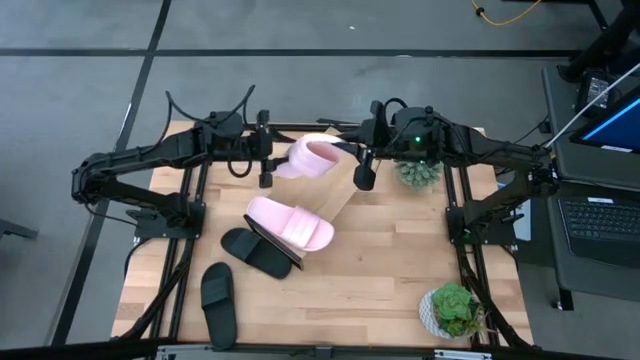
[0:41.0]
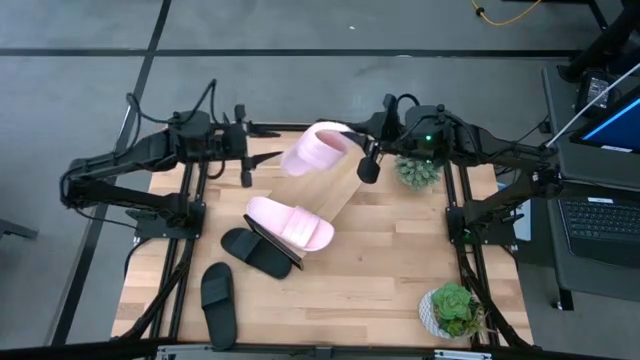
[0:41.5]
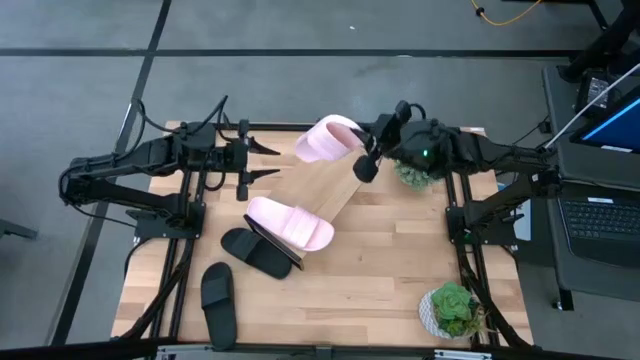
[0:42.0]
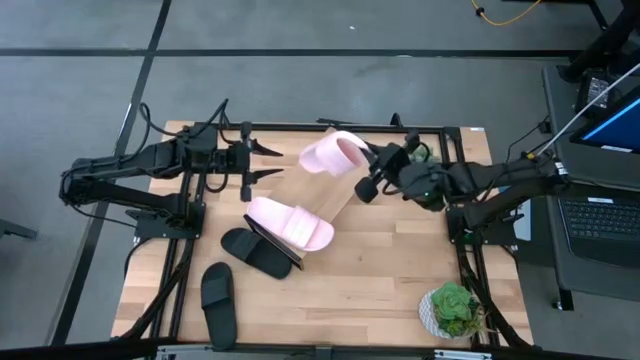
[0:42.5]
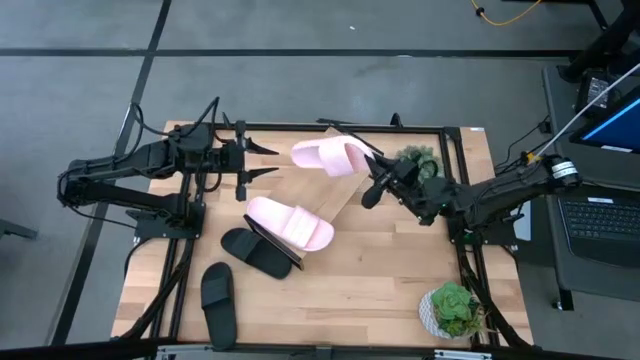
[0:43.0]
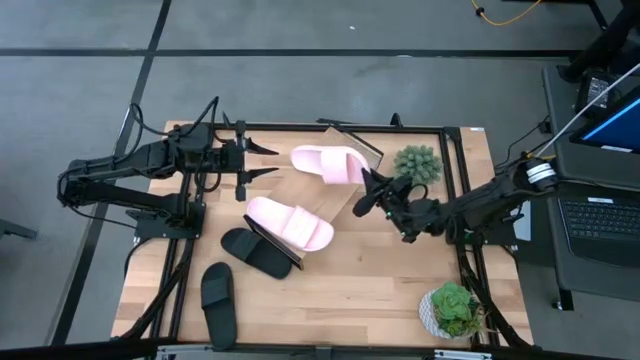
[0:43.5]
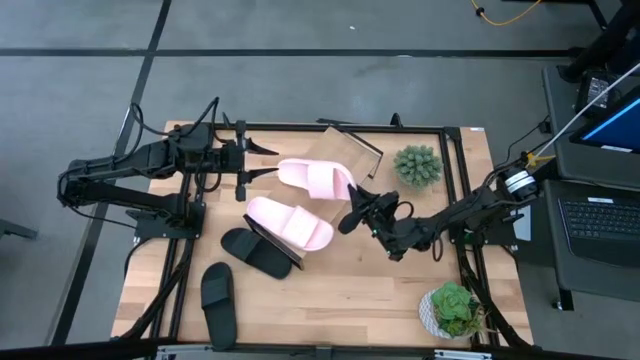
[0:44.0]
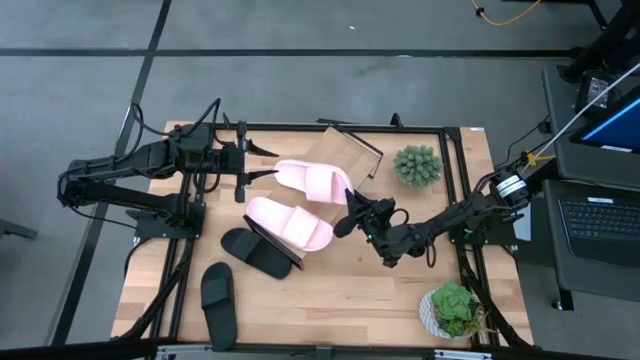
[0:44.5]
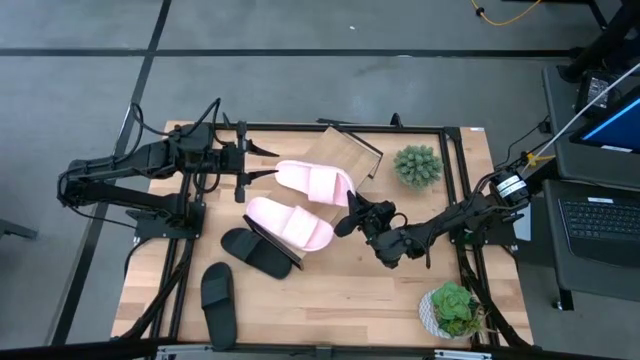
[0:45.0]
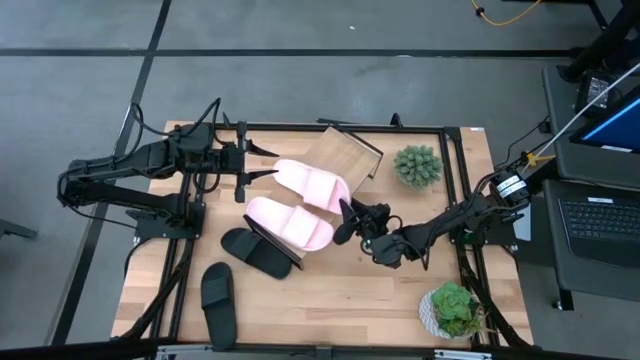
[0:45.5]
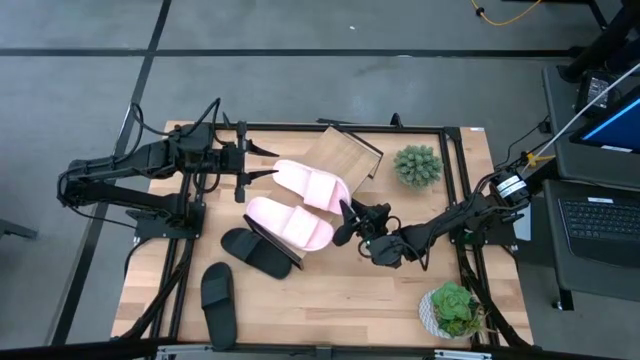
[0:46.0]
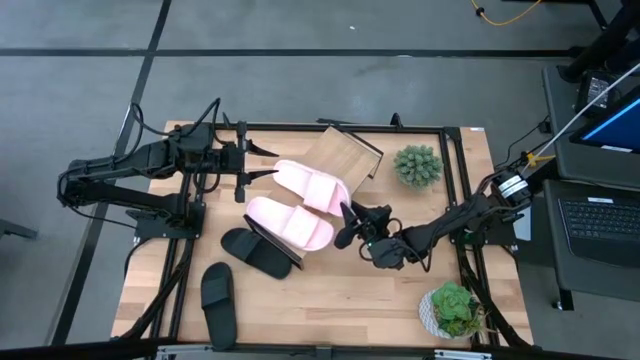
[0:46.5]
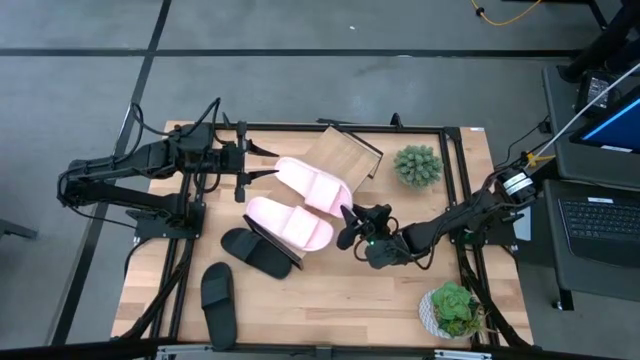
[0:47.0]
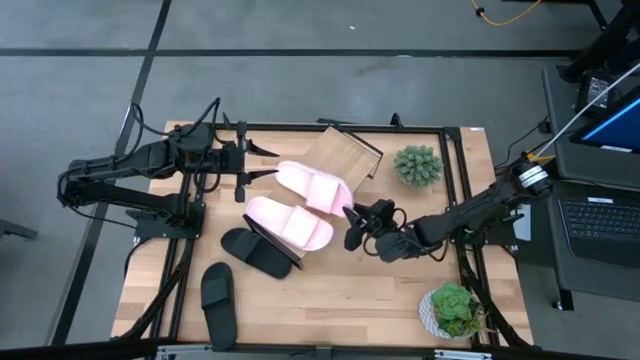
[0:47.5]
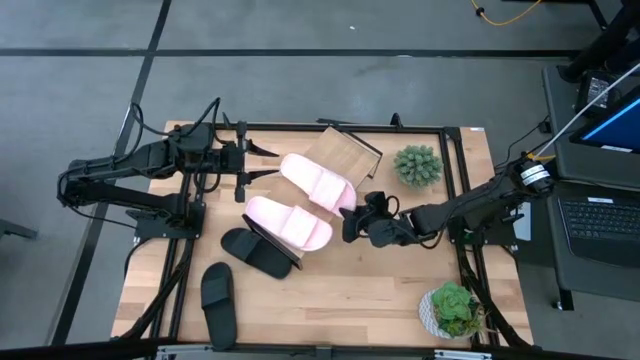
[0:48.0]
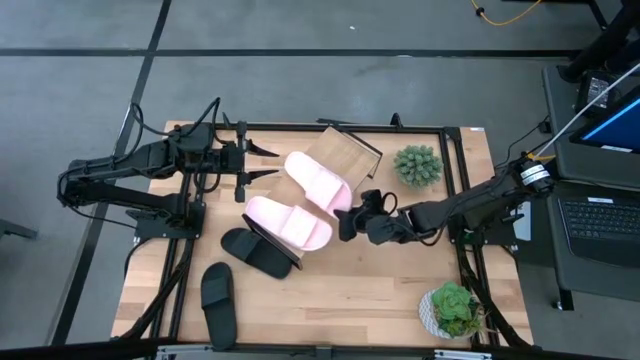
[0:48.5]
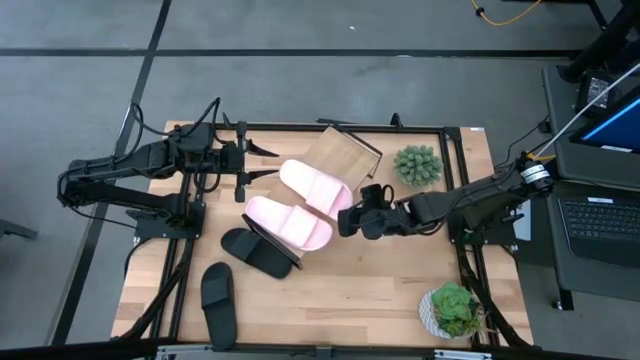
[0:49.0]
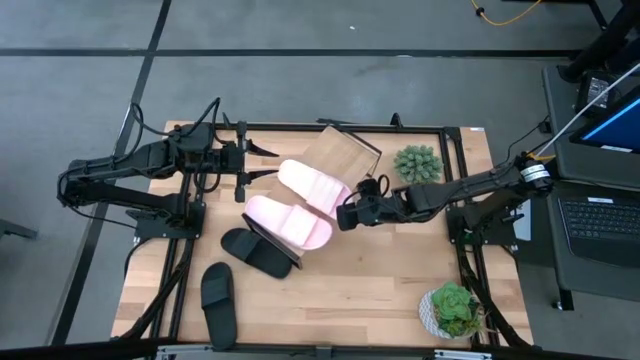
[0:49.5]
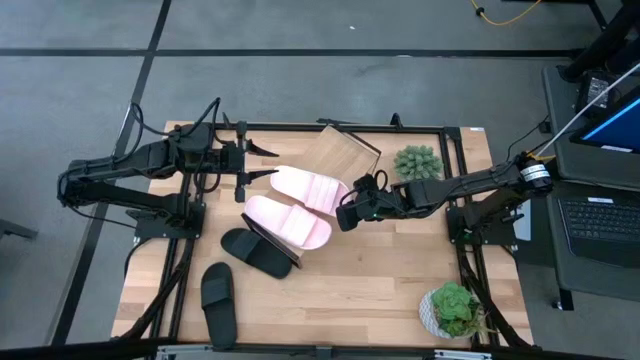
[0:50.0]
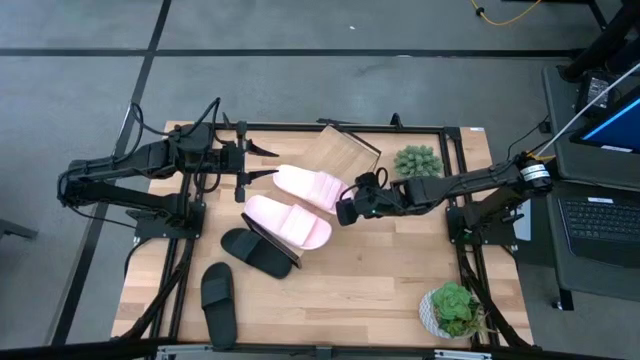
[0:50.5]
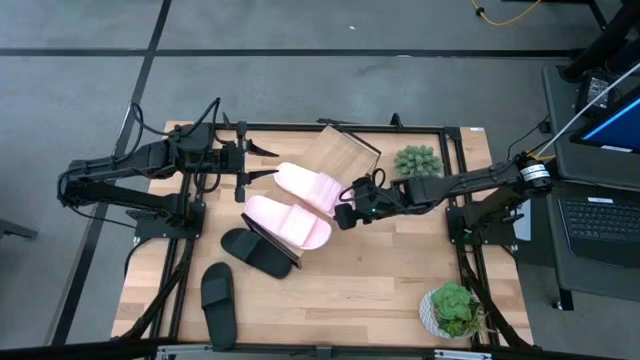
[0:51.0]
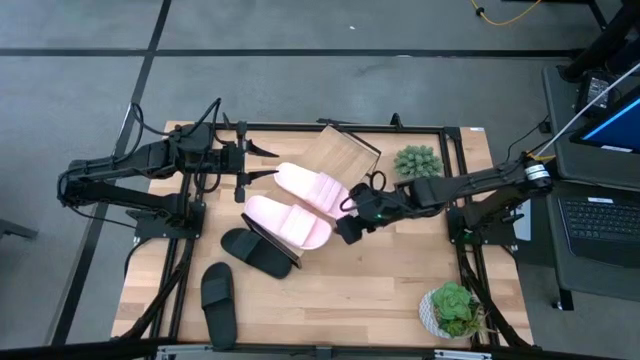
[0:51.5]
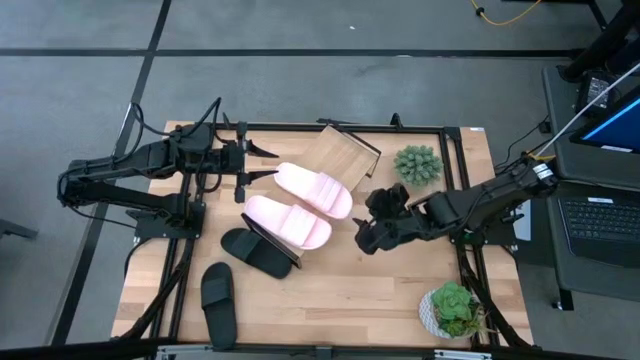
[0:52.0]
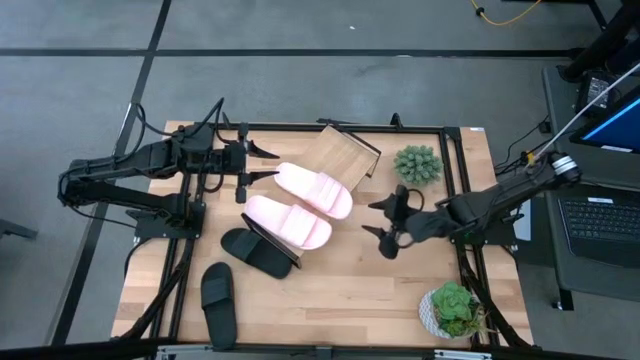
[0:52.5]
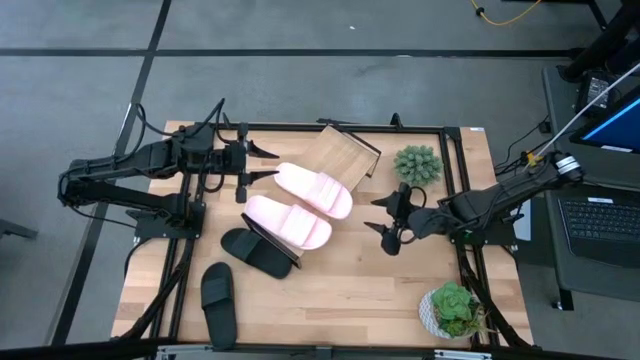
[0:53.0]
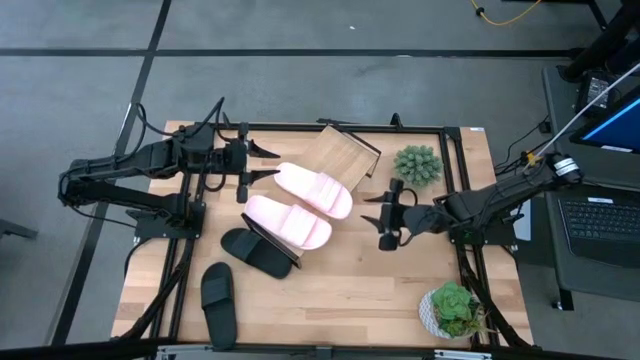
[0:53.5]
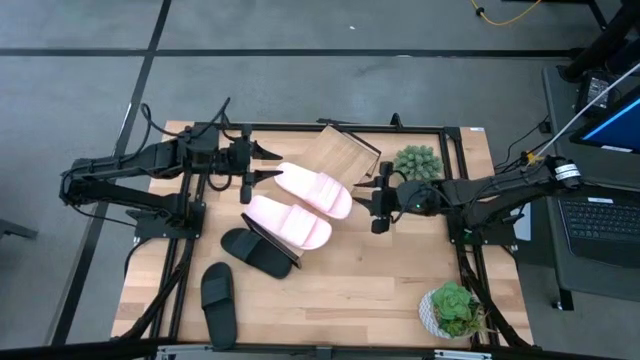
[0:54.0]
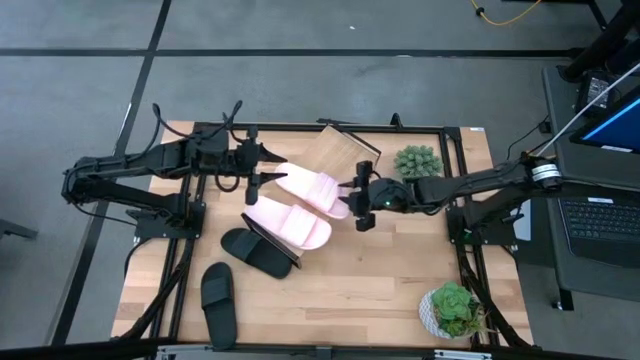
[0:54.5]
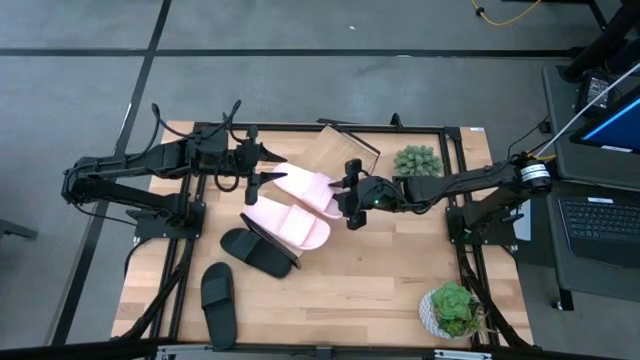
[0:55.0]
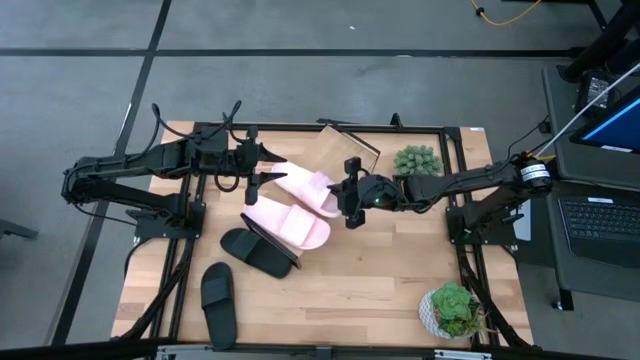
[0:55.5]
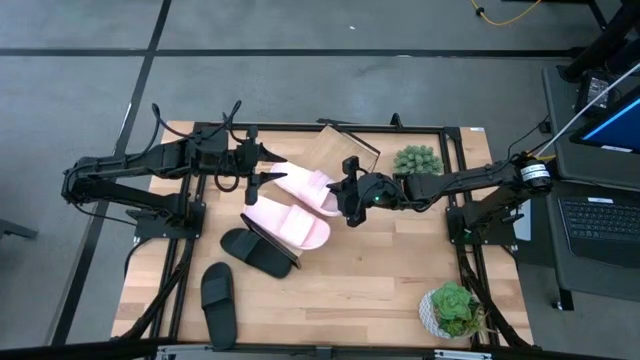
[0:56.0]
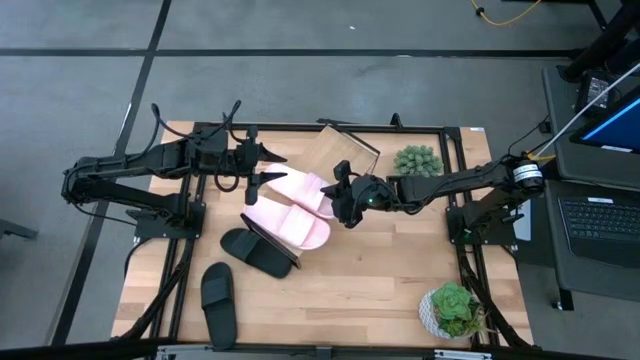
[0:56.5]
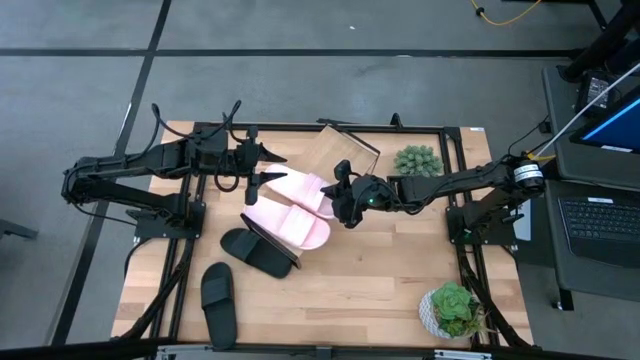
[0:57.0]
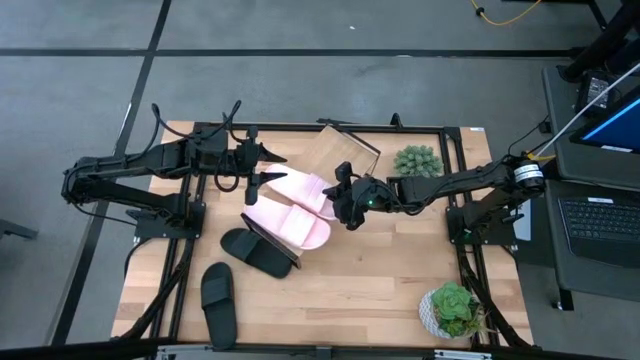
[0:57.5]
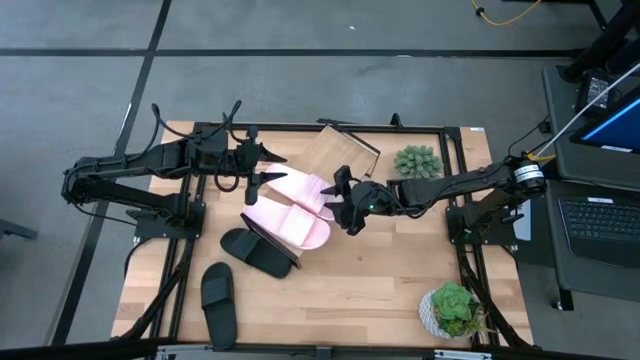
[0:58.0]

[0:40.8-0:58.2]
Task: Pick and place slides into the shelf
Put the pink slides on the shelf

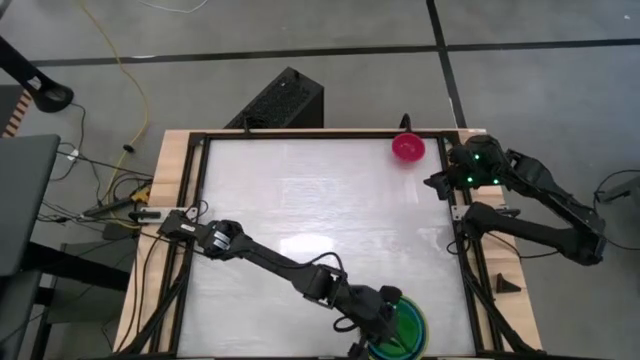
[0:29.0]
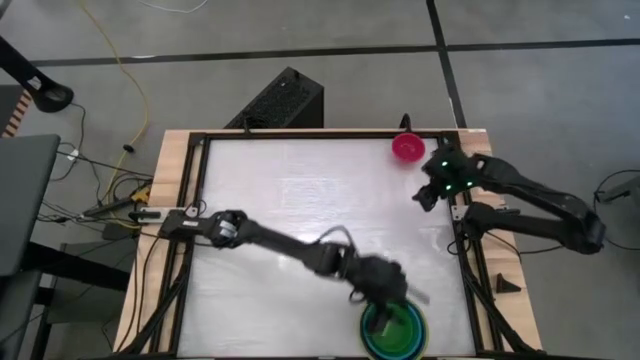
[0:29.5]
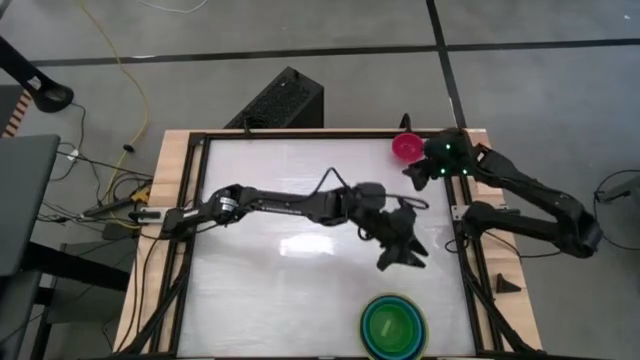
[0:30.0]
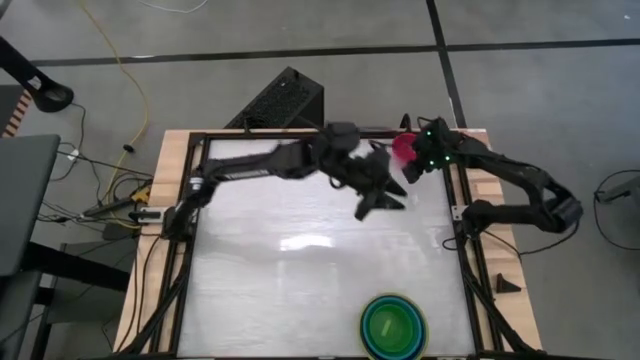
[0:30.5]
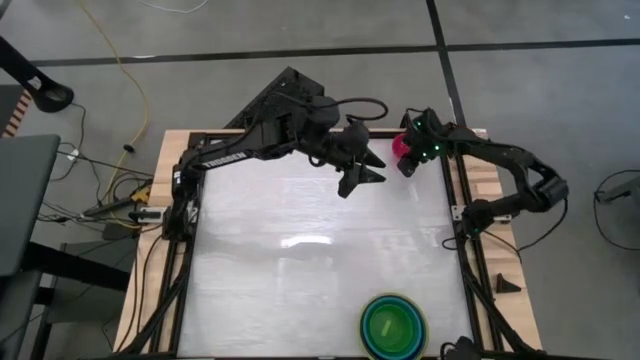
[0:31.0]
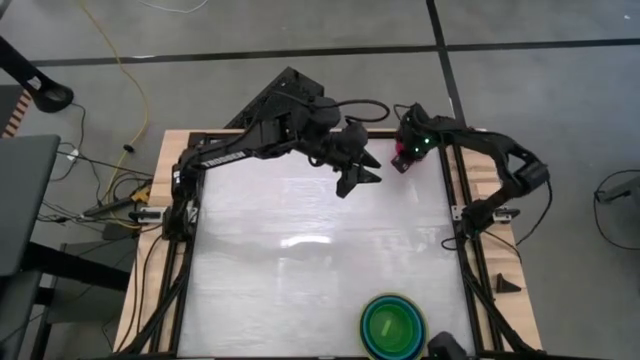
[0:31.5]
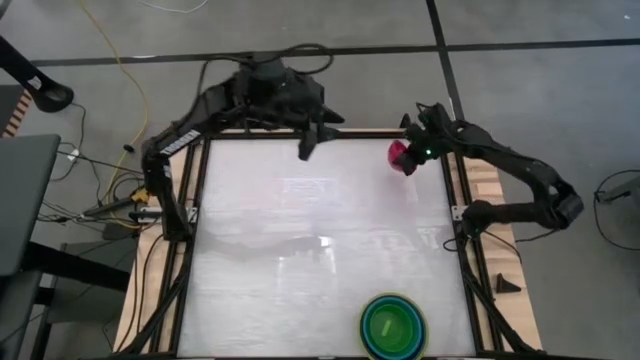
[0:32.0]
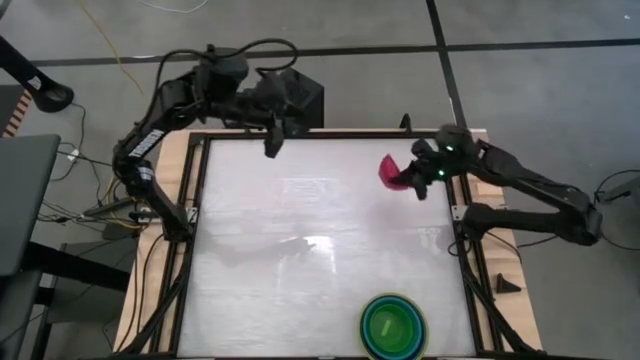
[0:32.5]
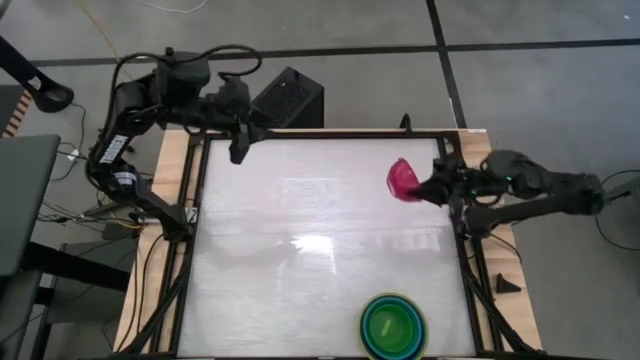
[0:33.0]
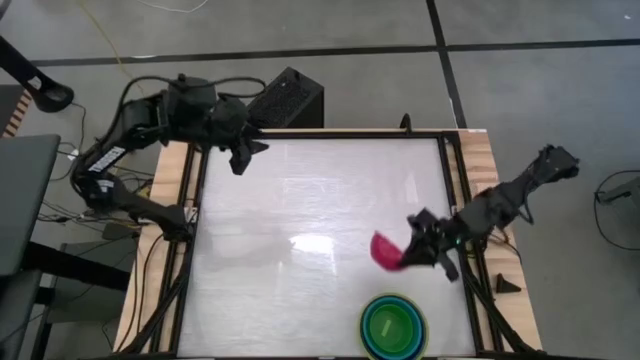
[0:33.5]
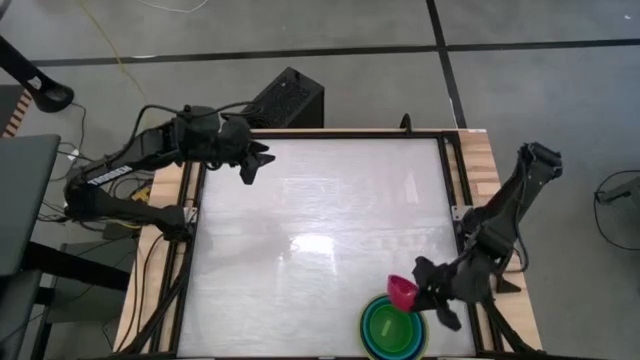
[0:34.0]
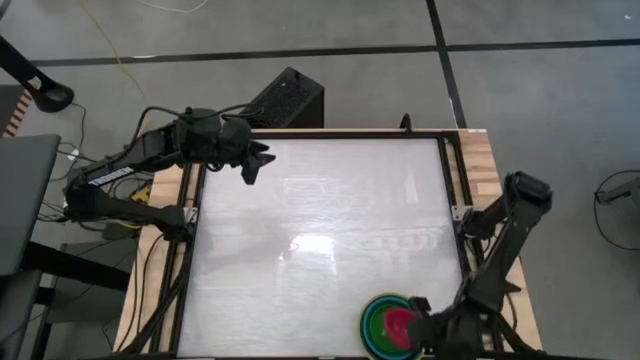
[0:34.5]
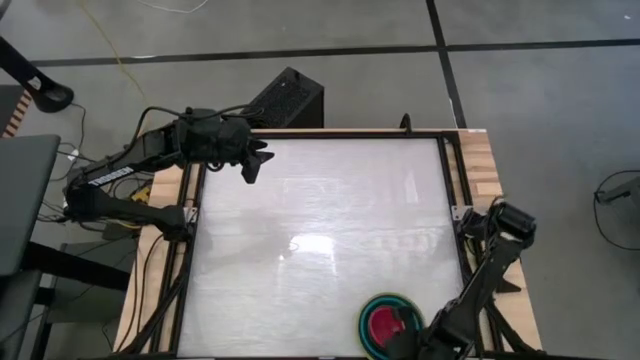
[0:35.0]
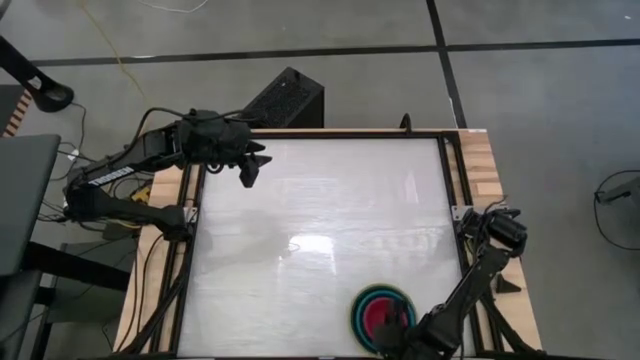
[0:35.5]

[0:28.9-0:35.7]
Task: Nest bowls inside each other by size order
Stack the red bowl into the light green bowl
